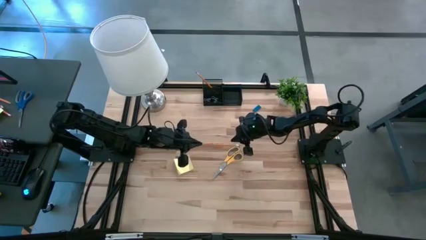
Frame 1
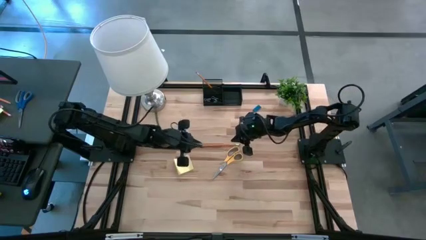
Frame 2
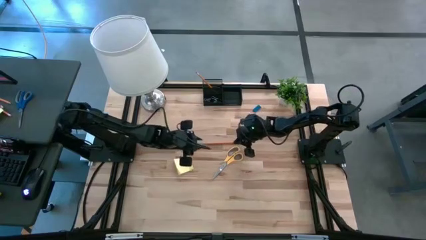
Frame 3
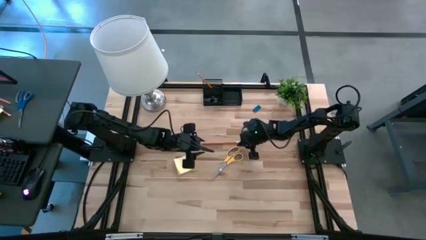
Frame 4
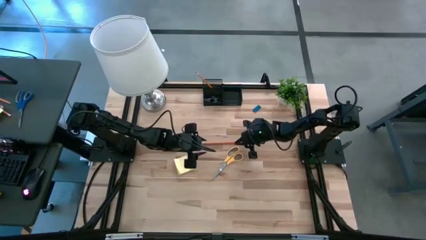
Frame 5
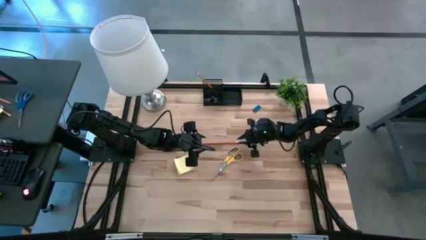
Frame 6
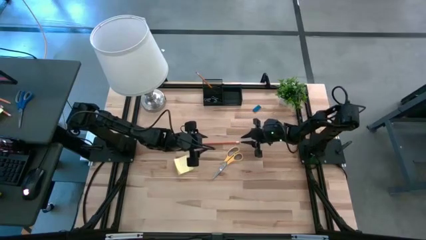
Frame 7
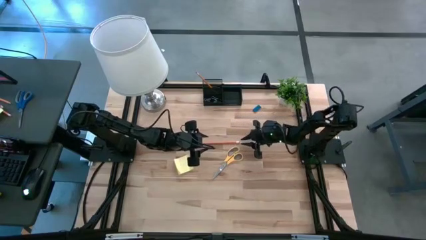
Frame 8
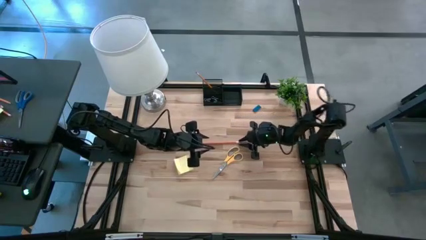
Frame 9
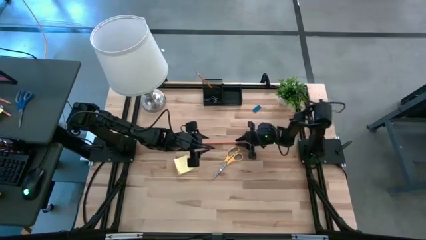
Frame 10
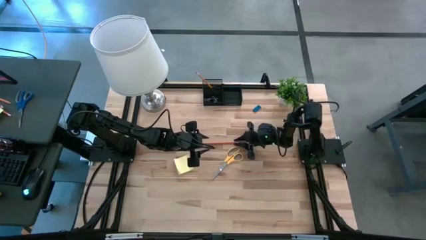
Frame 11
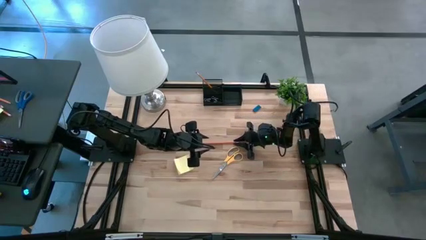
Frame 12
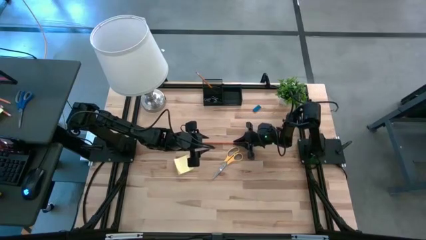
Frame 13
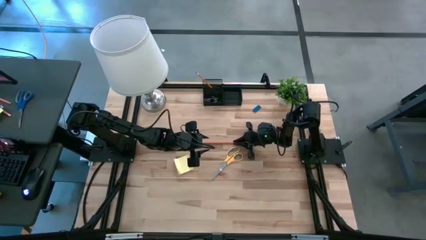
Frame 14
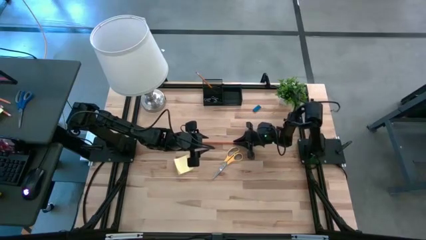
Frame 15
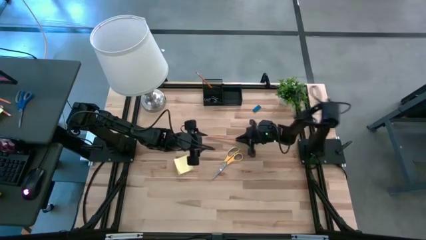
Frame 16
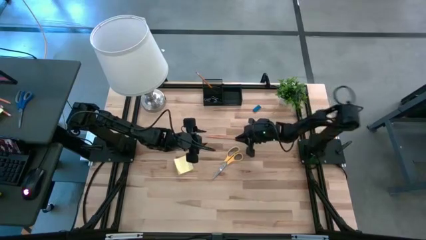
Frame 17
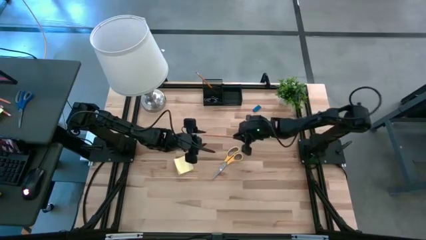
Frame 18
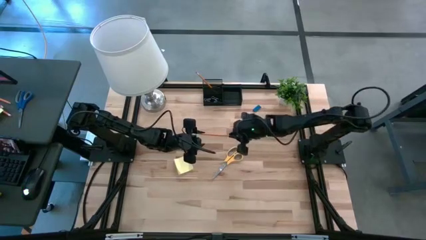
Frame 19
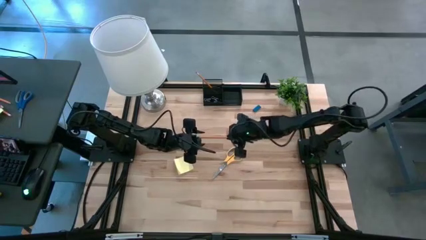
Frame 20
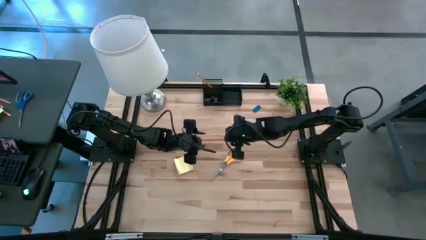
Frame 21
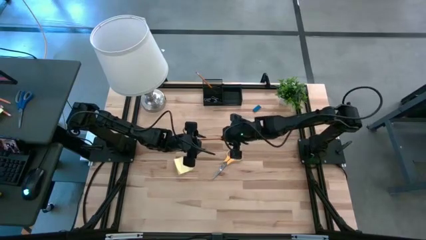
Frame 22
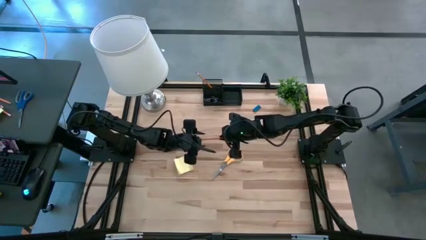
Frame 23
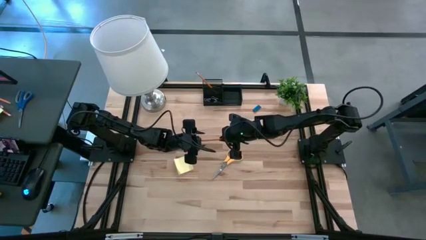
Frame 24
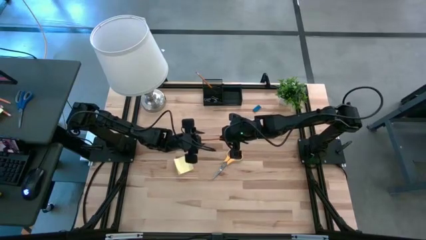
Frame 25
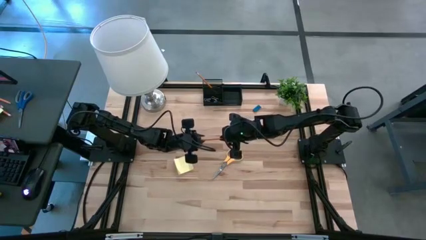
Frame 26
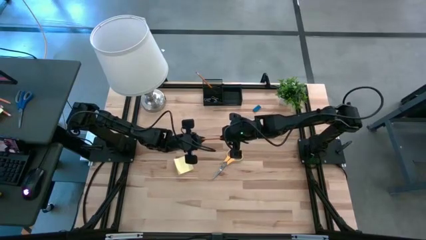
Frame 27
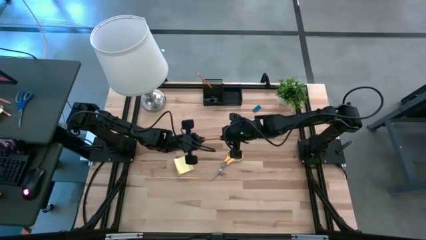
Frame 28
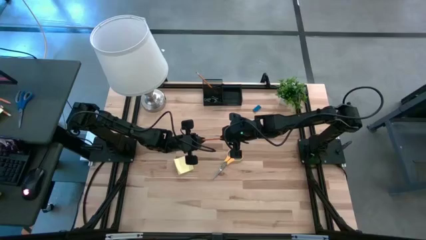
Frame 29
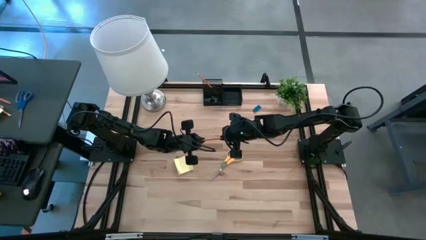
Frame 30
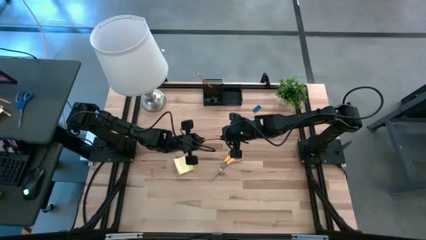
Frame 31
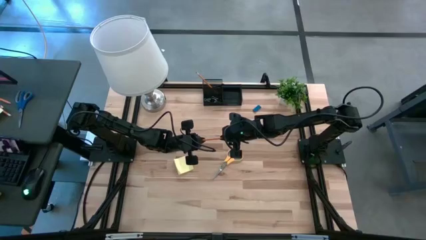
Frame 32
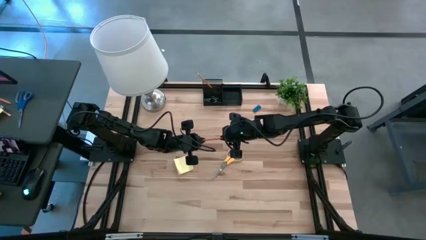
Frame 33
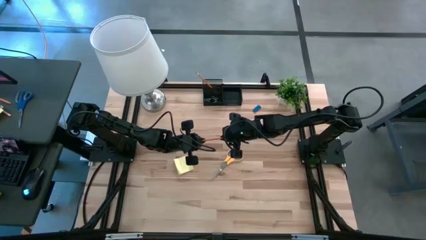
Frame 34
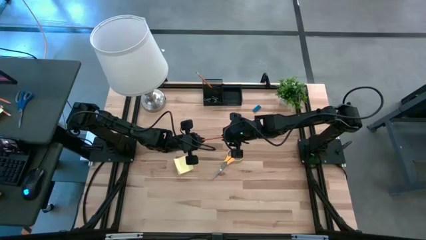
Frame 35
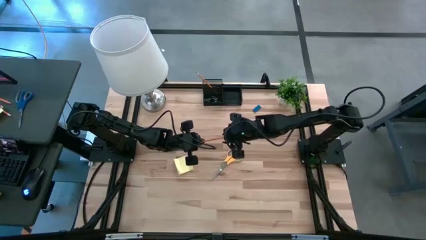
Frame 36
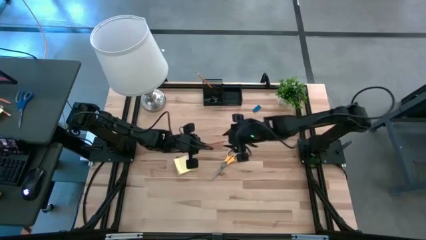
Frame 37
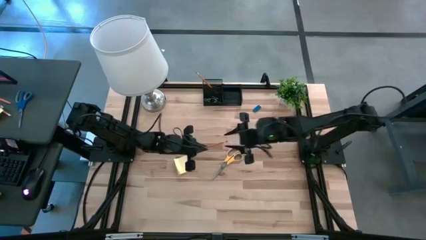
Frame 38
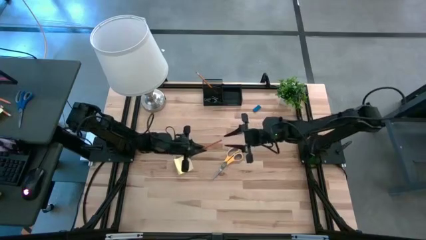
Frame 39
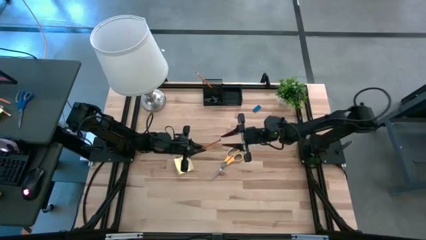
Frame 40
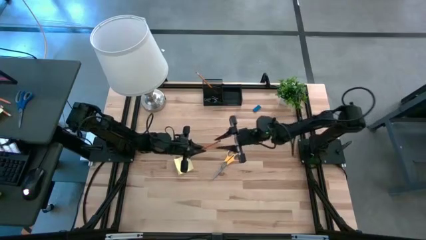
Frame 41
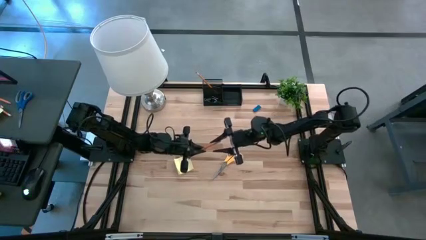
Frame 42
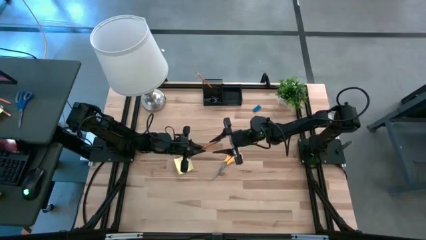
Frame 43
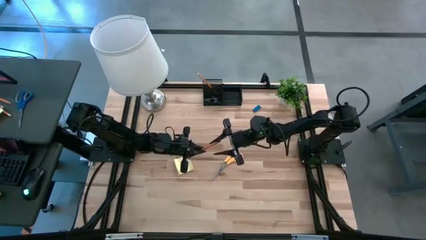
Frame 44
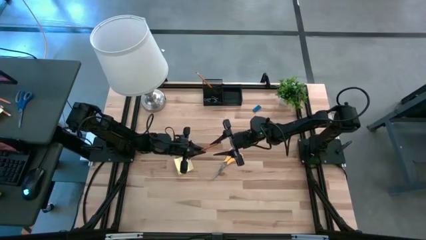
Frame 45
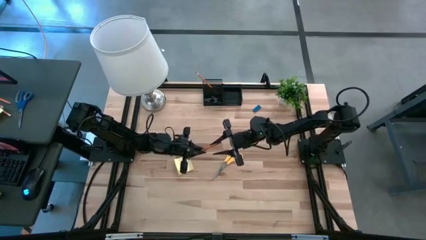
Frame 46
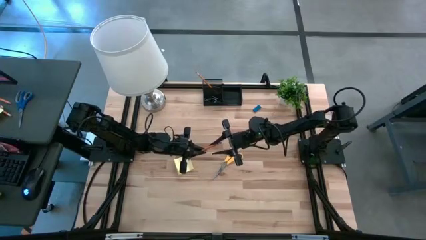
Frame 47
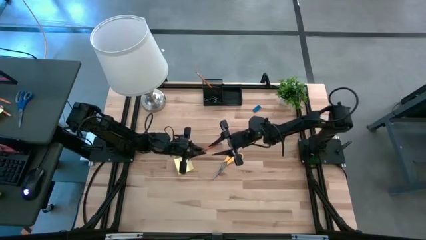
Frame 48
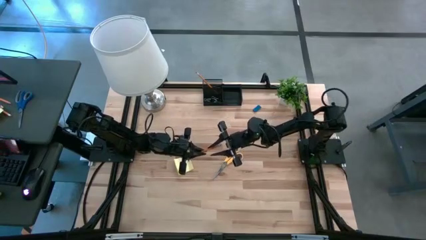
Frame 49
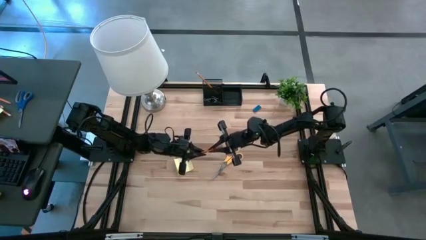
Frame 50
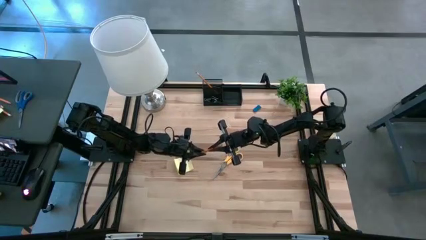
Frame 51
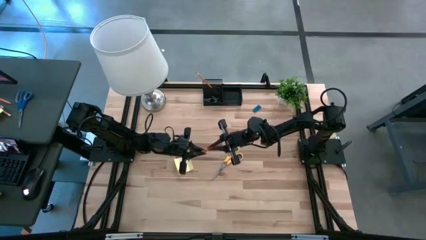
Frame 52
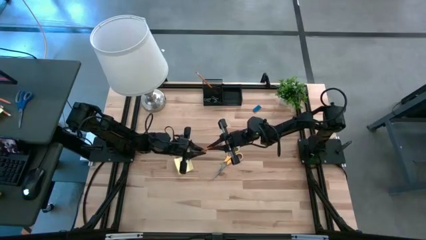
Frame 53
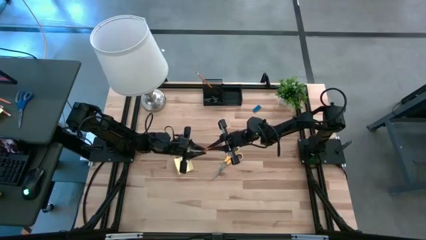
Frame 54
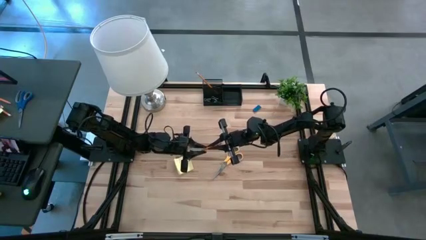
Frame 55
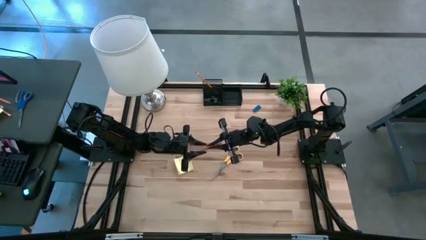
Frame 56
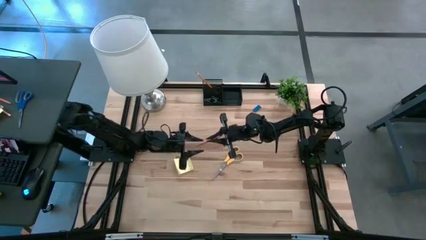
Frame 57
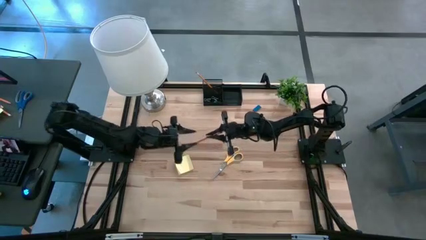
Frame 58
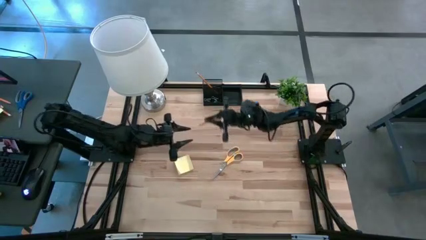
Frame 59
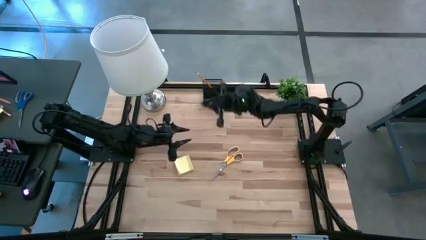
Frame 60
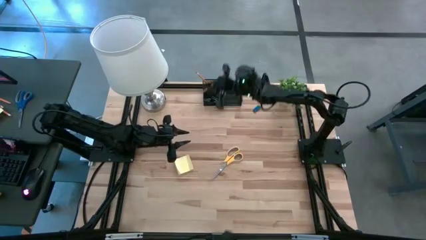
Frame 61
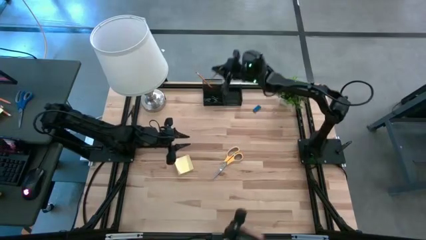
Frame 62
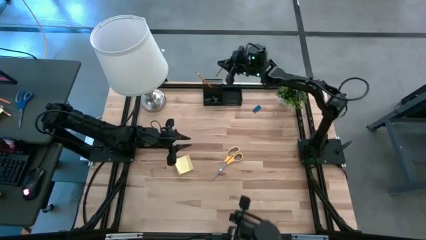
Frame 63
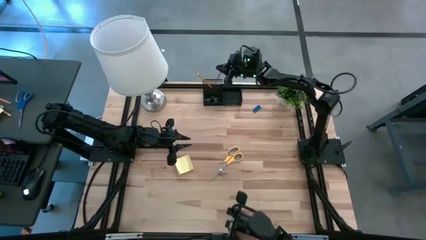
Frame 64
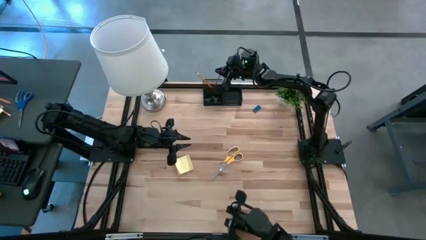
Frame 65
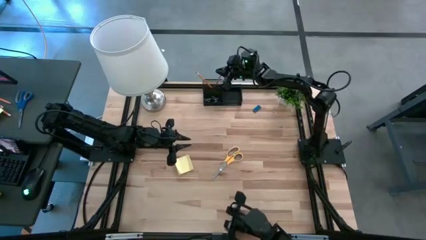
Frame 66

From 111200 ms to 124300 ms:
Task: Pick and place office supplies into organizer
Put the pencil into the desk organizer
